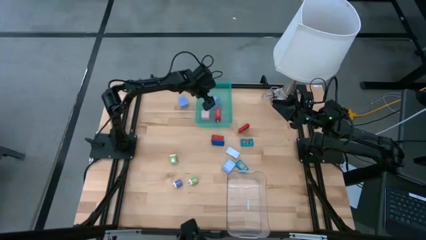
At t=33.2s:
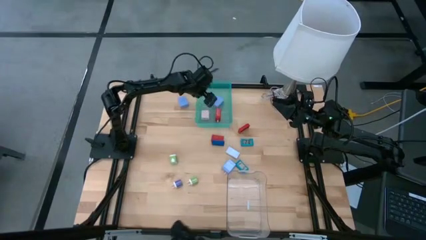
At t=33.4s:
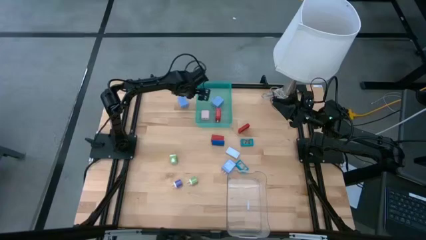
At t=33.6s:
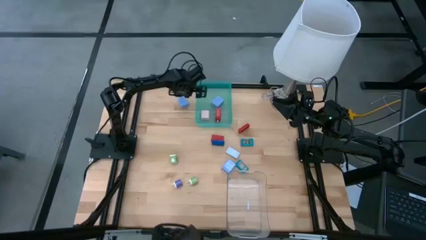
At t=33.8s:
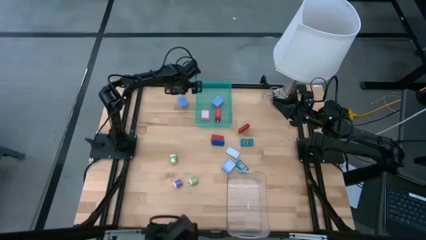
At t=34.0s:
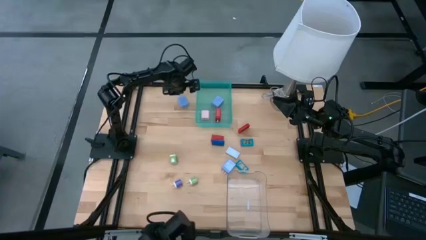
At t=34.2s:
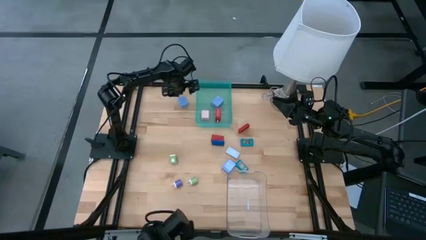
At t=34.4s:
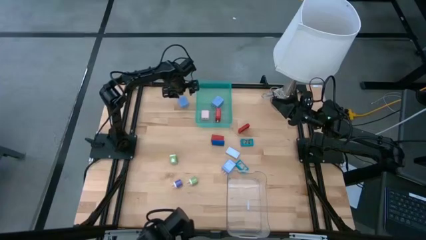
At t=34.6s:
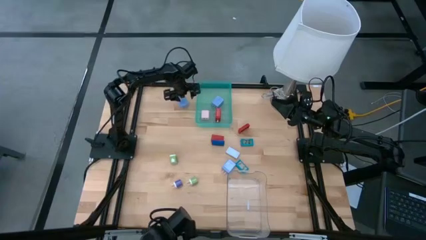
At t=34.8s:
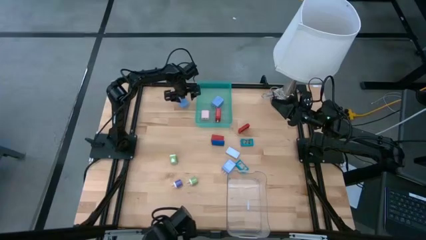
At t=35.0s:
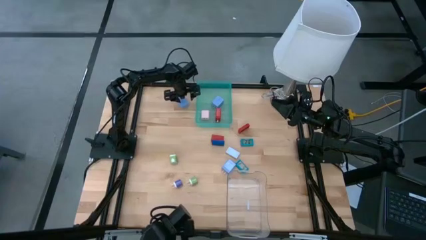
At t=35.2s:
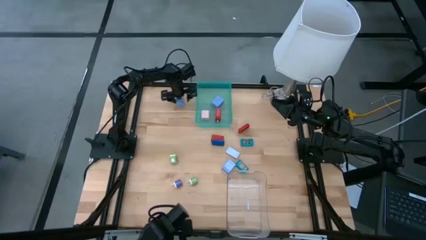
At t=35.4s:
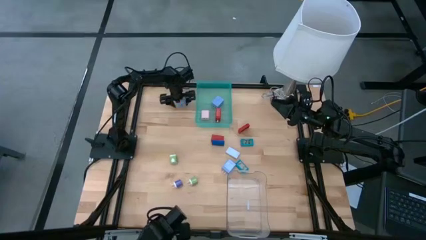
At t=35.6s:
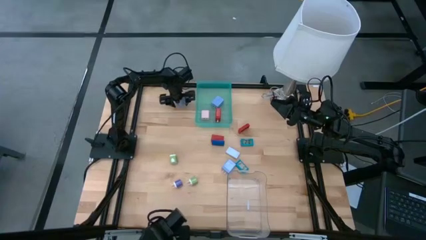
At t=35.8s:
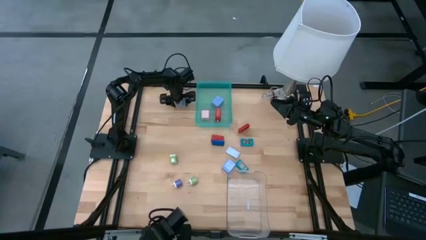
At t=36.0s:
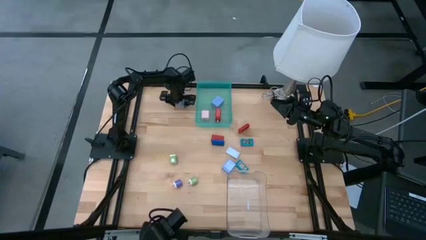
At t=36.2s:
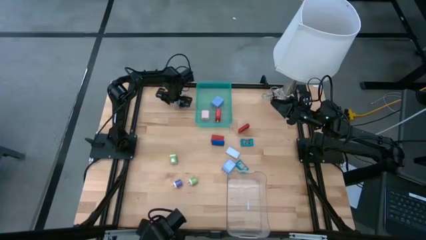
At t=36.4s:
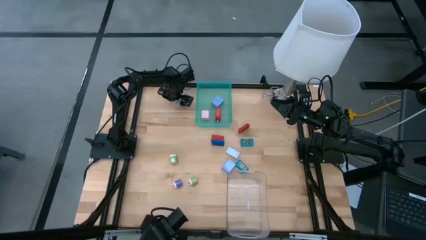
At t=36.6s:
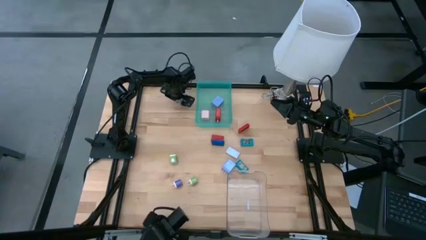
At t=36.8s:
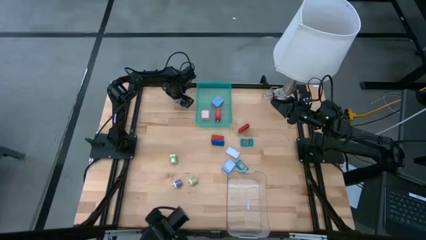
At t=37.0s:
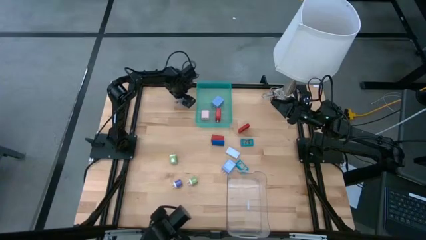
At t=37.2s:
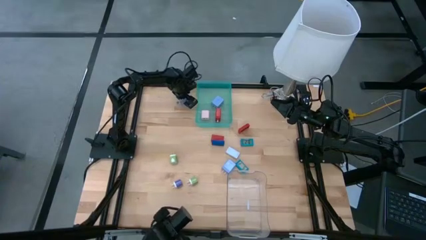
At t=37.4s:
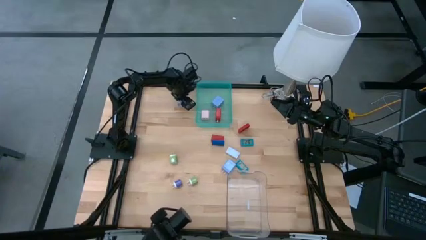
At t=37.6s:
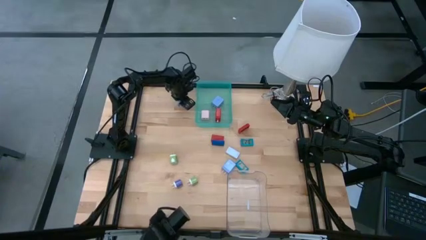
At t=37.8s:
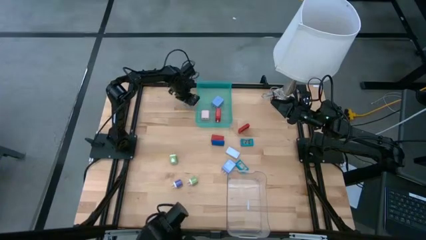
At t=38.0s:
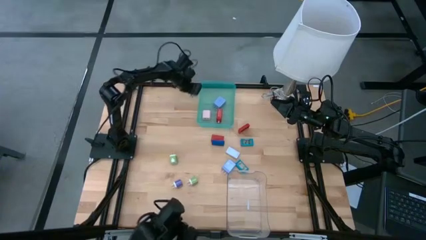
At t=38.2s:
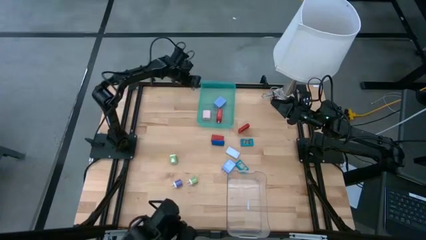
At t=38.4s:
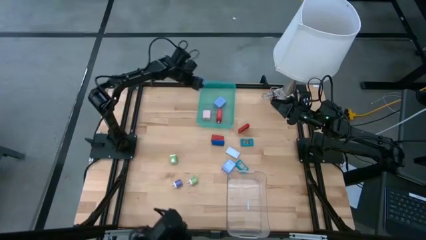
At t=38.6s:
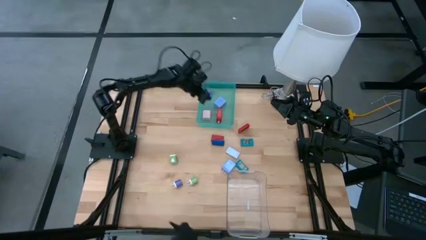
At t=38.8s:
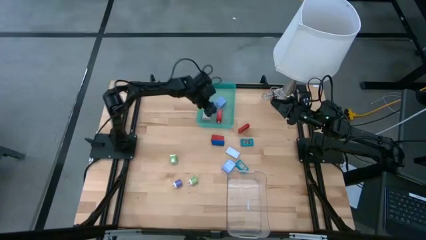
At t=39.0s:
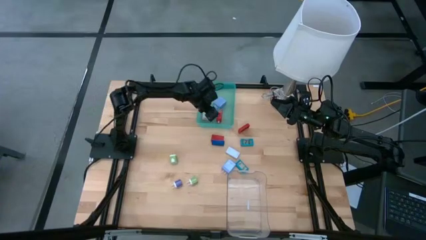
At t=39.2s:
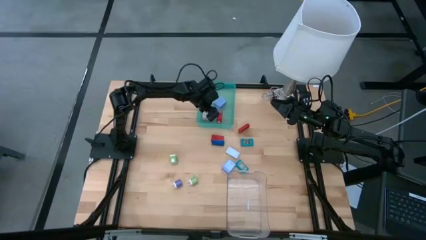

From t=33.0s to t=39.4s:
Task: Pick & Place Office items
Put the top blue charger adapter into the green bin

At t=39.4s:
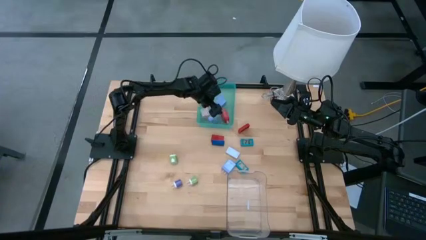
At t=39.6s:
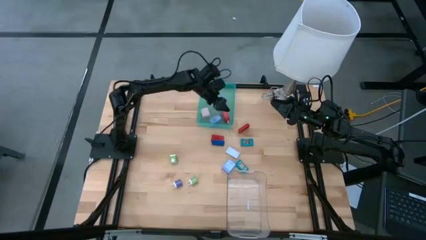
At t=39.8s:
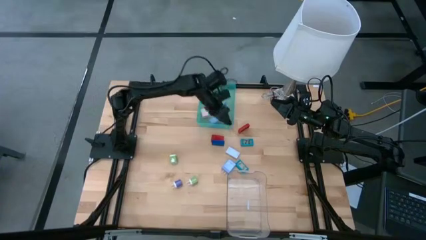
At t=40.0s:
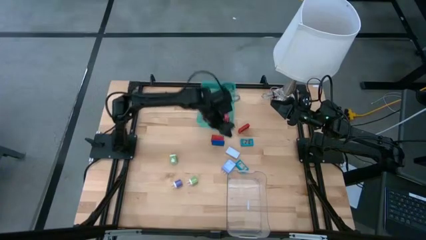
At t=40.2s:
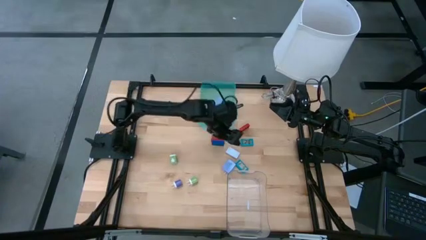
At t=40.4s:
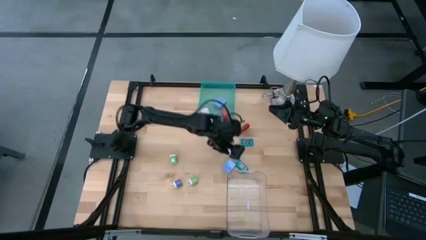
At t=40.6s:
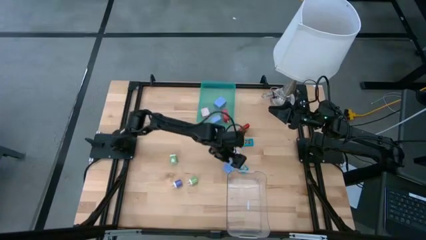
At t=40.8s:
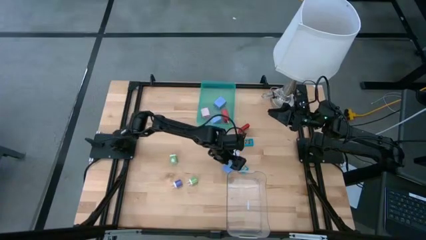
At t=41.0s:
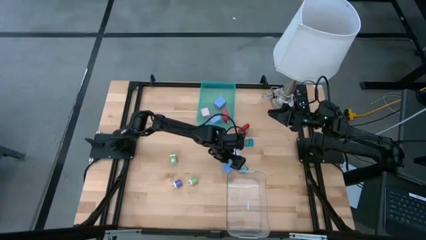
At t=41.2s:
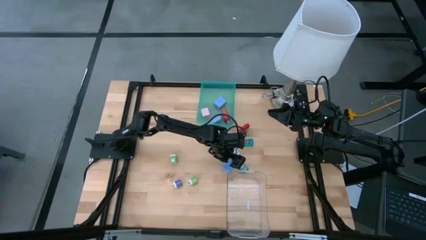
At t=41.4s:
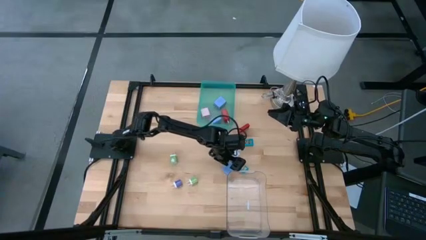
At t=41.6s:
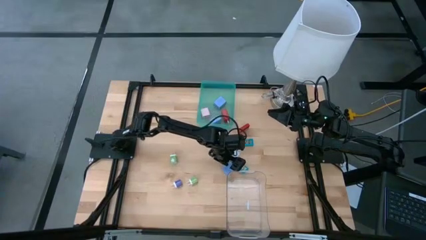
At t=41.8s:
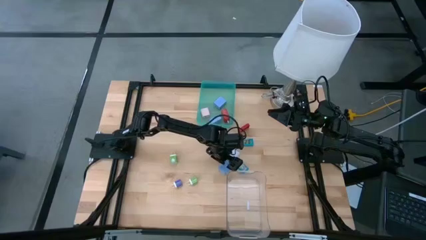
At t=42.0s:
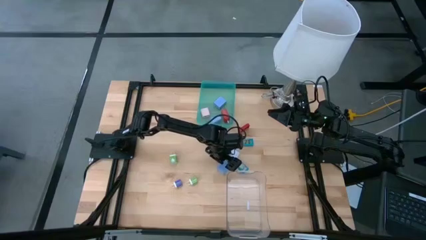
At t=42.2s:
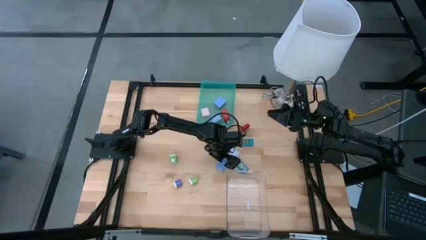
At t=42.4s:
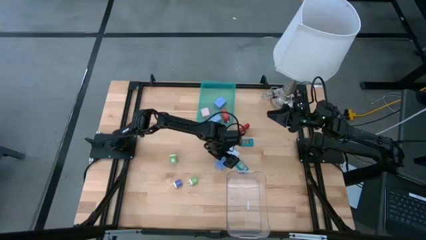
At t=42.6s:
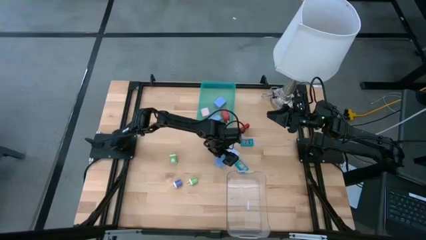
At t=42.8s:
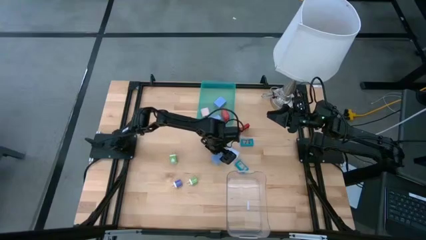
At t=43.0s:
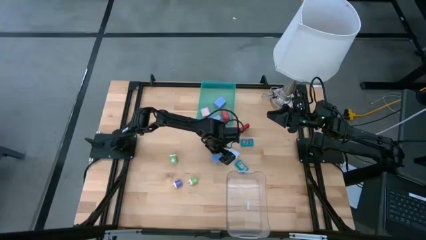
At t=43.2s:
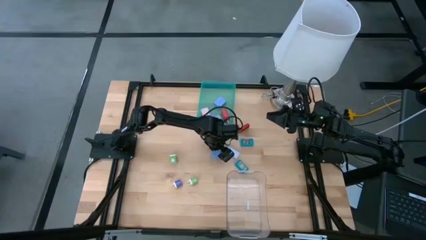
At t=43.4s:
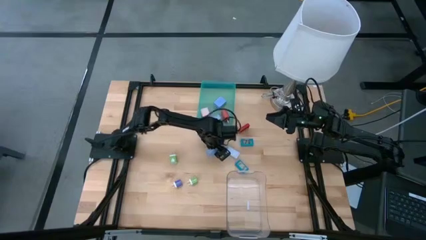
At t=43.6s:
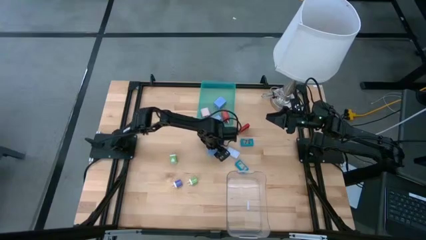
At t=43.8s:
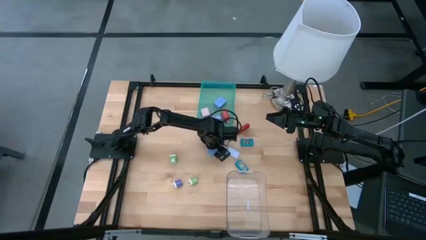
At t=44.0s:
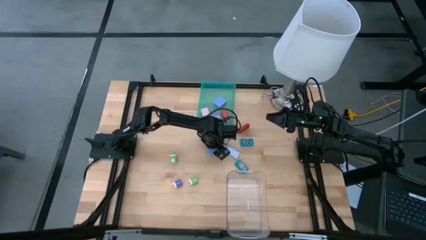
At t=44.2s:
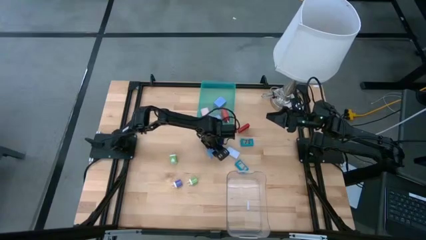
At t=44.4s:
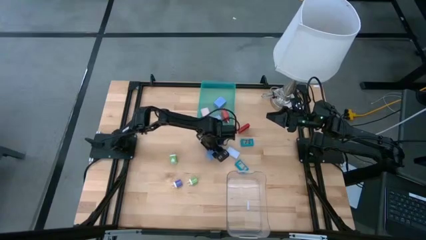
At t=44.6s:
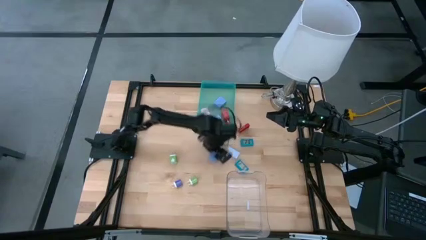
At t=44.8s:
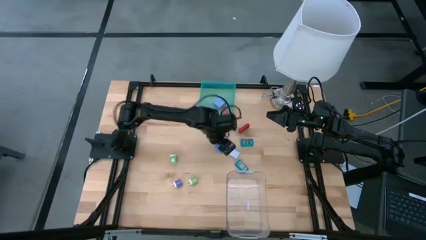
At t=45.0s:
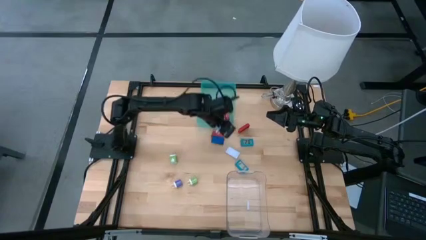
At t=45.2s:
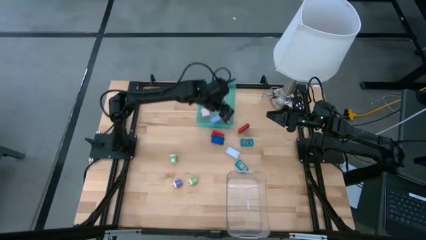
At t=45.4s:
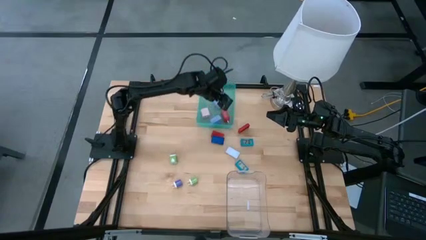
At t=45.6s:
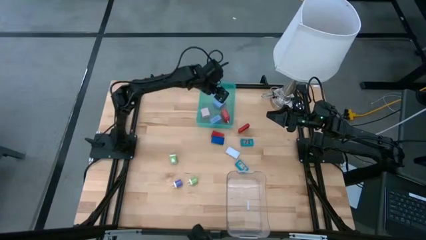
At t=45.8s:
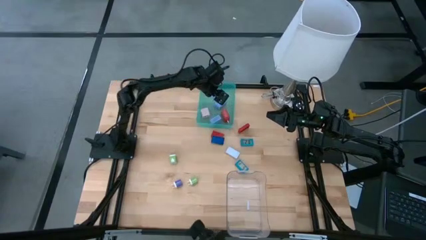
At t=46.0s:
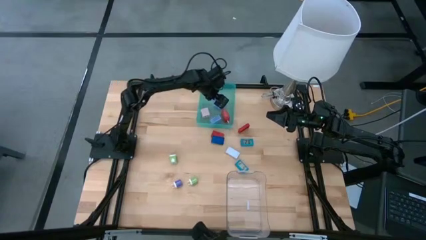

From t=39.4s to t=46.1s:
Put the blue charger adapter into the green bin

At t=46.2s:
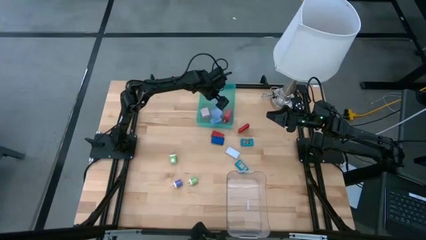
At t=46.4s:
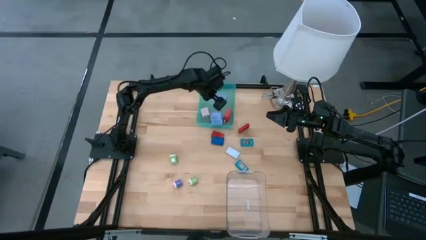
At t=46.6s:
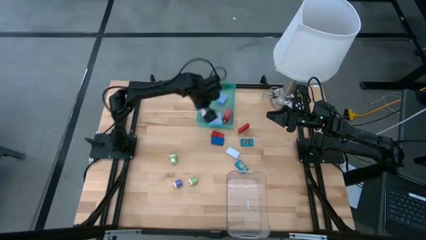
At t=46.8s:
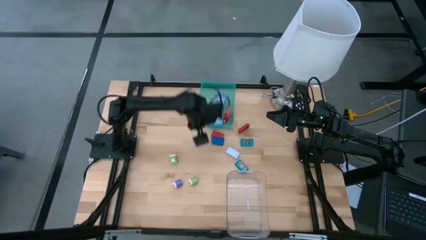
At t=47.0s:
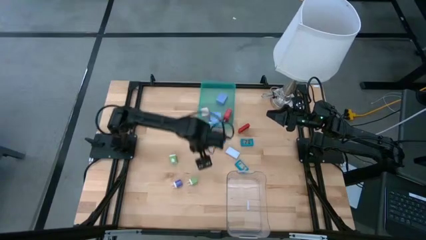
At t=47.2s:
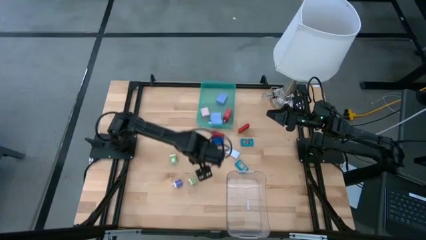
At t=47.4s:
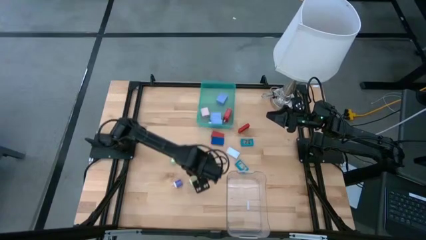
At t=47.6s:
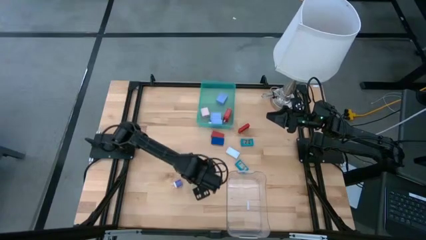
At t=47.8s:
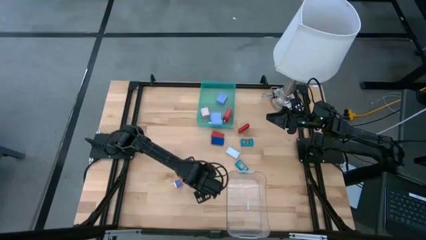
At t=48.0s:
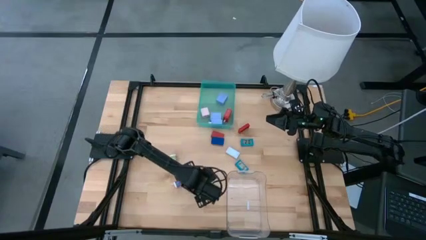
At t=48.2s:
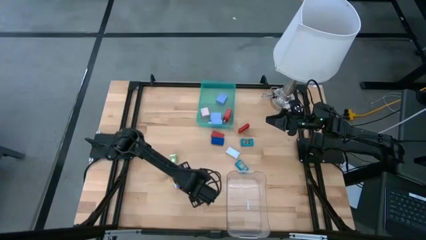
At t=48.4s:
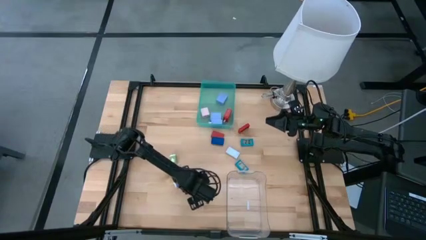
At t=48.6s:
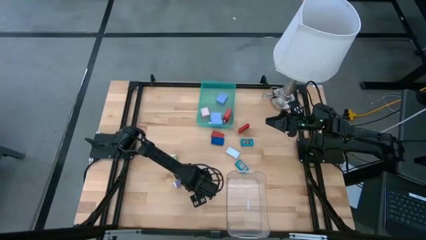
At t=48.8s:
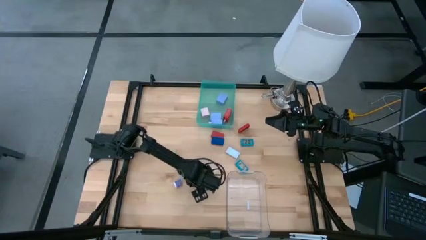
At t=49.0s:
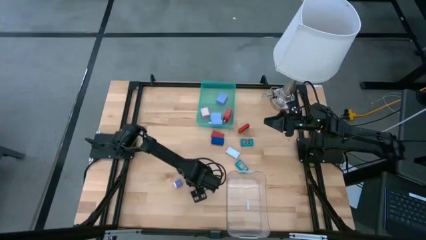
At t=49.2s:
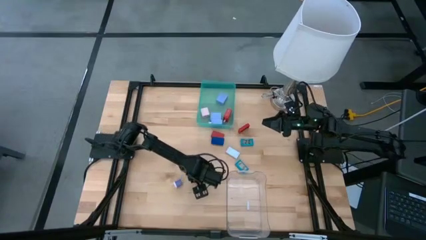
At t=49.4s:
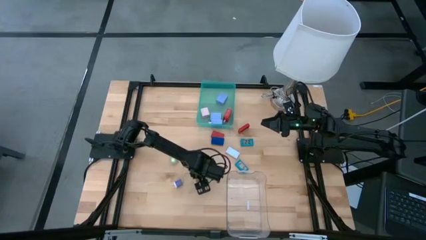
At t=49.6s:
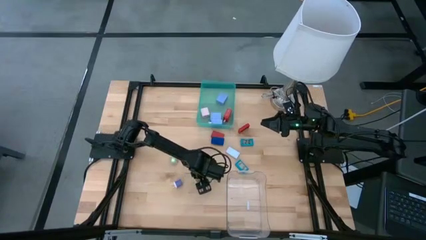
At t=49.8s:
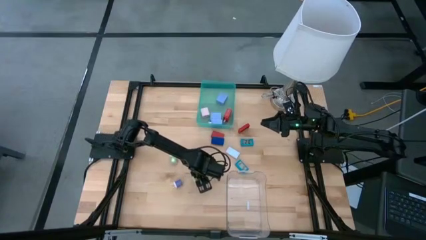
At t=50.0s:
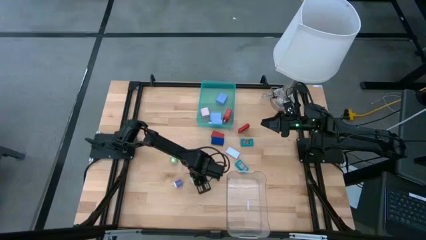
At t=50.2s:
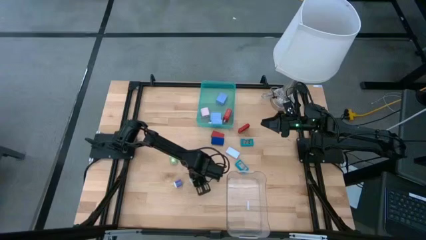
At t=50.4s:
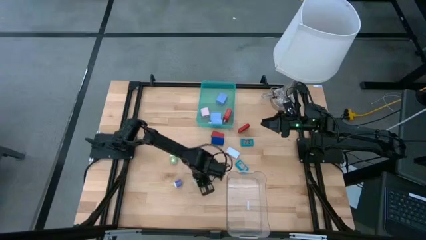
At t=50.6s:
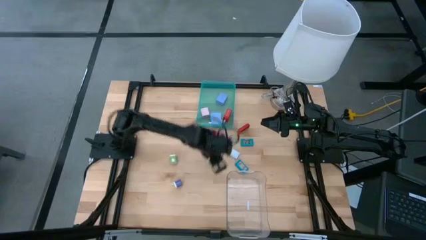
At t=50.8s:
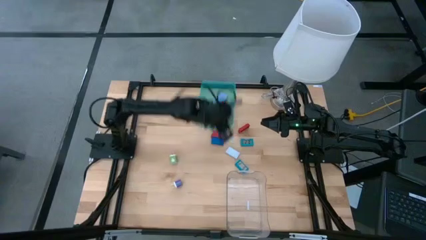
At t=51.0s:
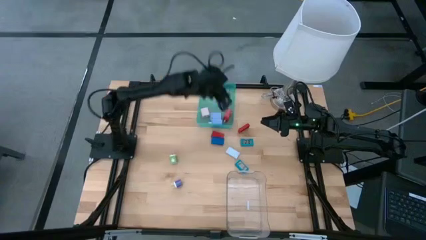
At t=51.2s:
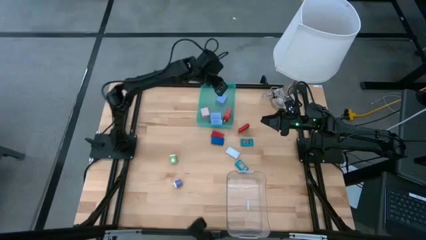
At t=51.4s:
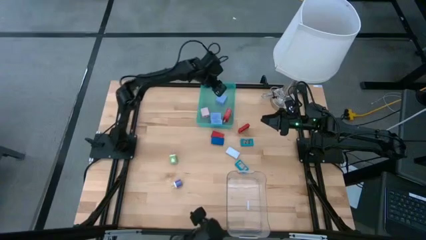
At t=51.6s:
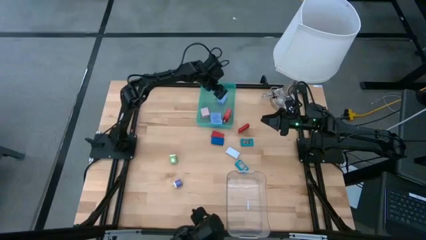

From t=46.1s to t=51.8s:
Put the bottom green charger adapter into the green bin
